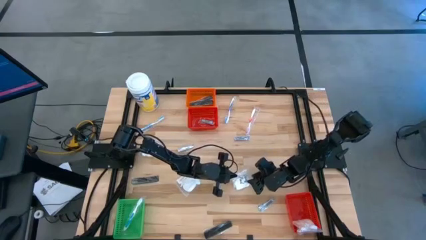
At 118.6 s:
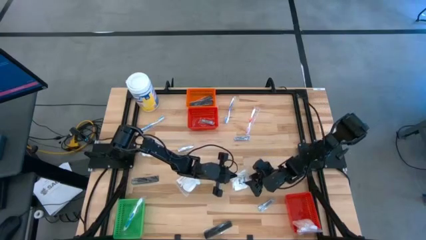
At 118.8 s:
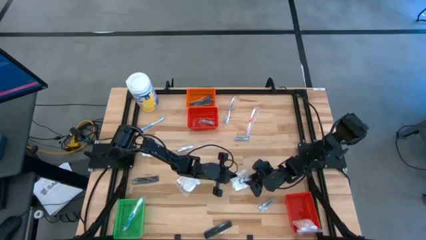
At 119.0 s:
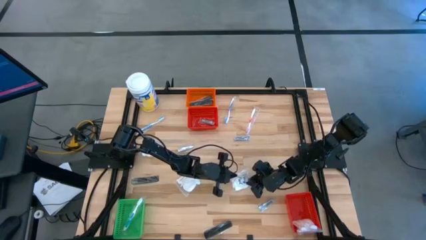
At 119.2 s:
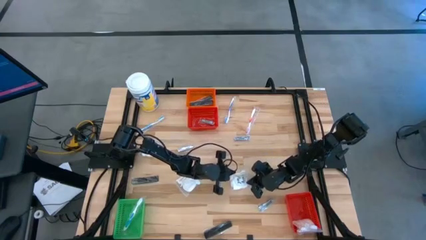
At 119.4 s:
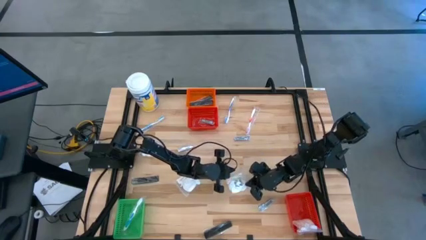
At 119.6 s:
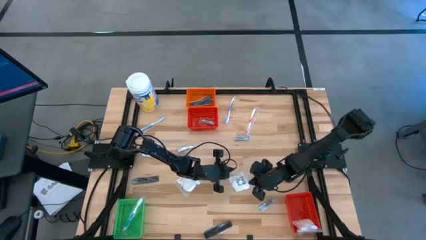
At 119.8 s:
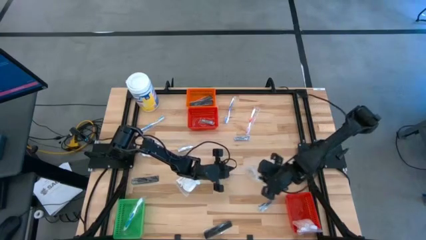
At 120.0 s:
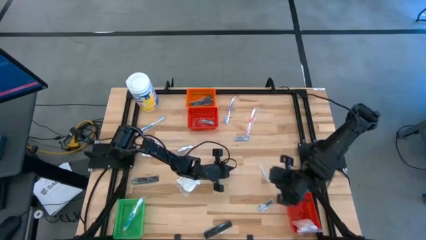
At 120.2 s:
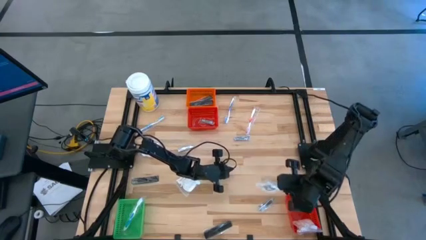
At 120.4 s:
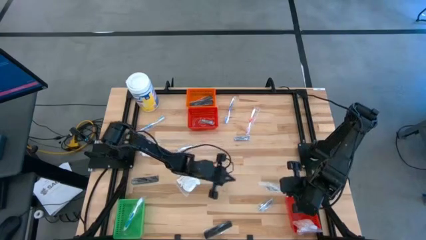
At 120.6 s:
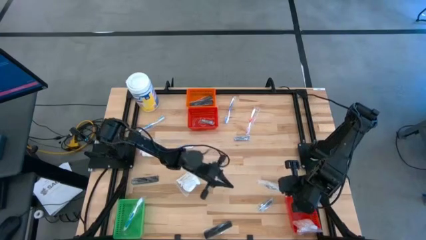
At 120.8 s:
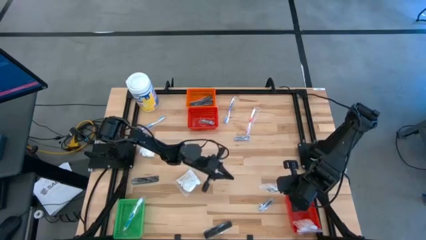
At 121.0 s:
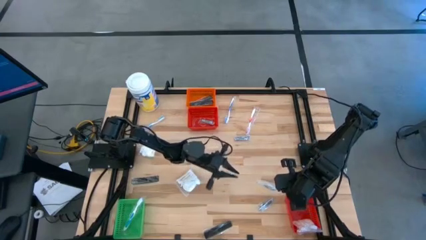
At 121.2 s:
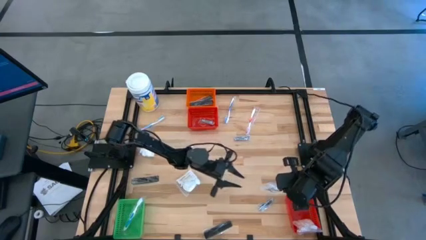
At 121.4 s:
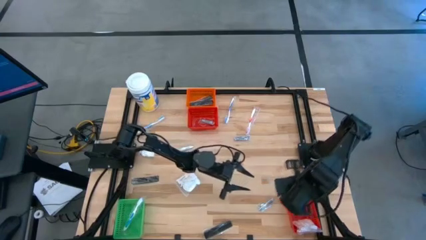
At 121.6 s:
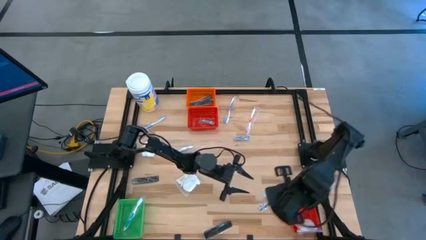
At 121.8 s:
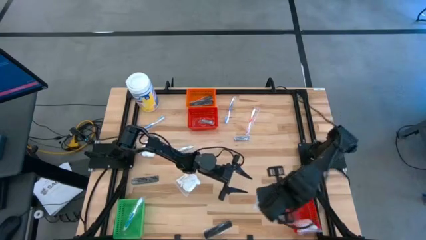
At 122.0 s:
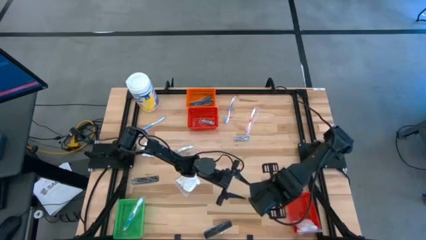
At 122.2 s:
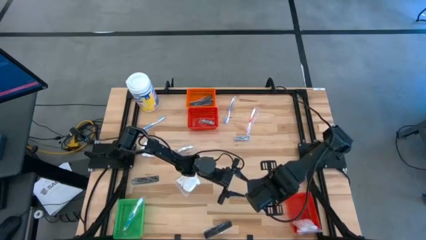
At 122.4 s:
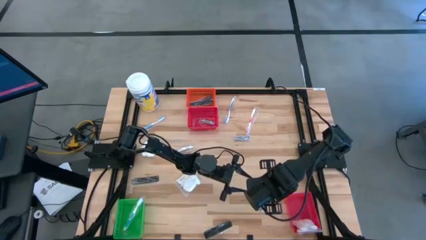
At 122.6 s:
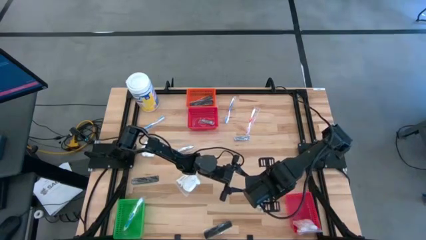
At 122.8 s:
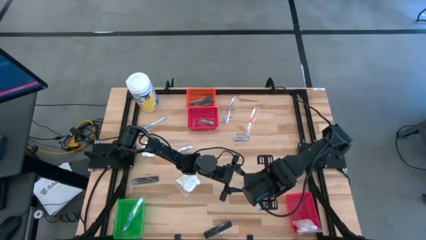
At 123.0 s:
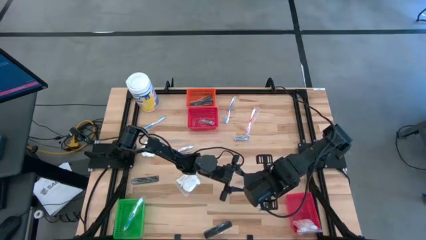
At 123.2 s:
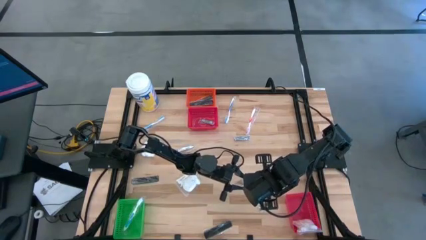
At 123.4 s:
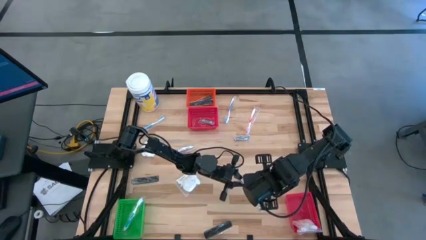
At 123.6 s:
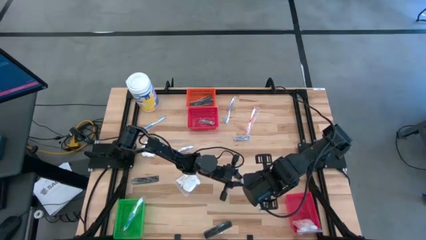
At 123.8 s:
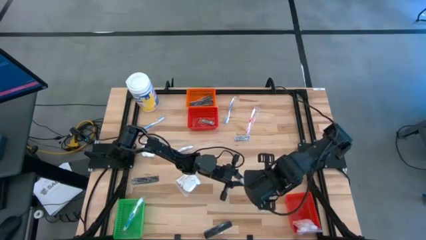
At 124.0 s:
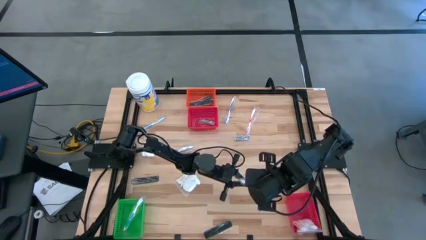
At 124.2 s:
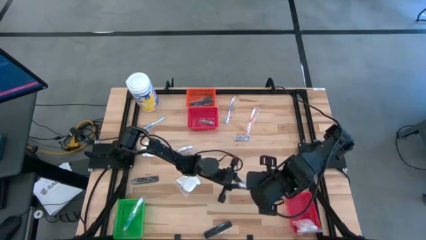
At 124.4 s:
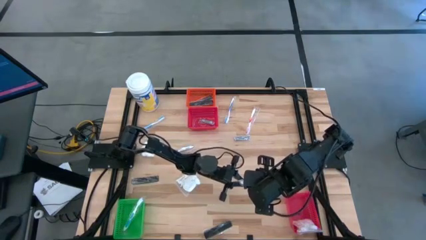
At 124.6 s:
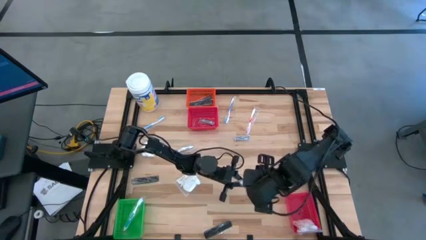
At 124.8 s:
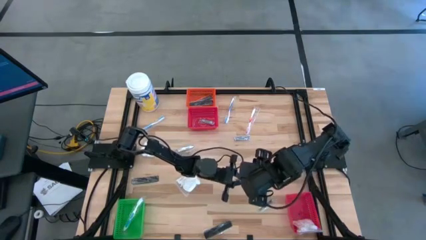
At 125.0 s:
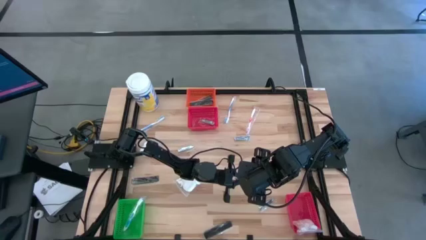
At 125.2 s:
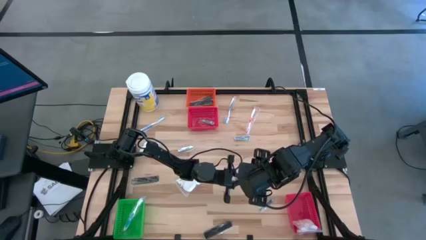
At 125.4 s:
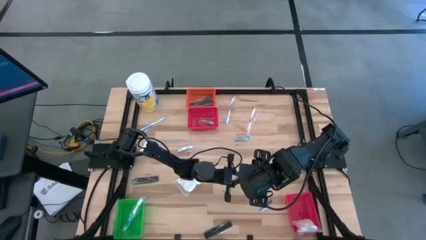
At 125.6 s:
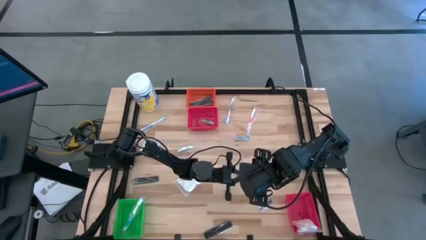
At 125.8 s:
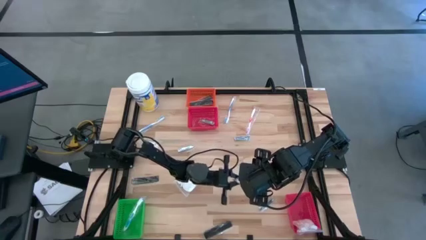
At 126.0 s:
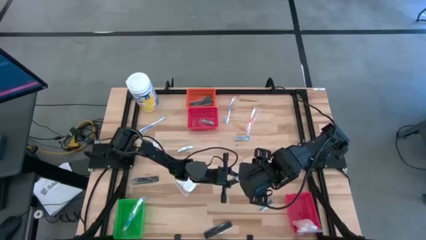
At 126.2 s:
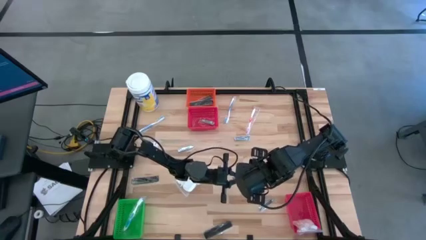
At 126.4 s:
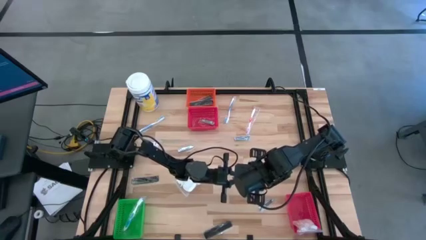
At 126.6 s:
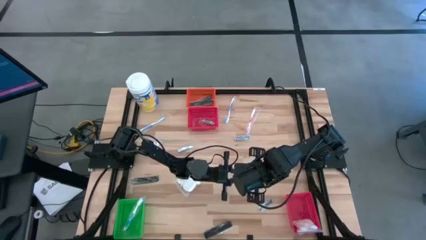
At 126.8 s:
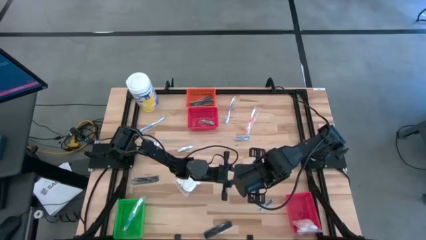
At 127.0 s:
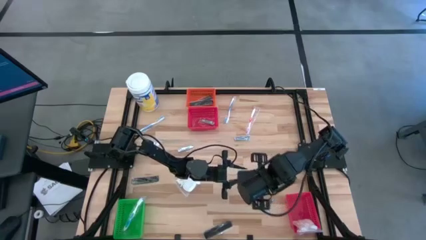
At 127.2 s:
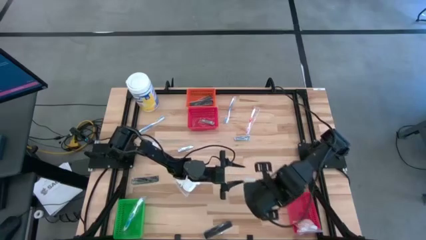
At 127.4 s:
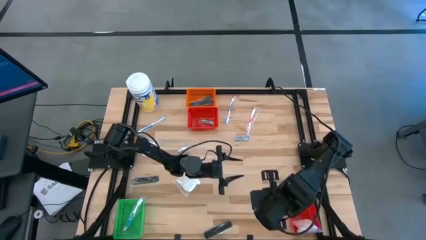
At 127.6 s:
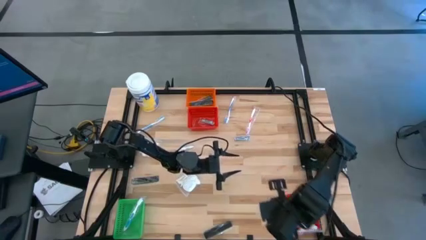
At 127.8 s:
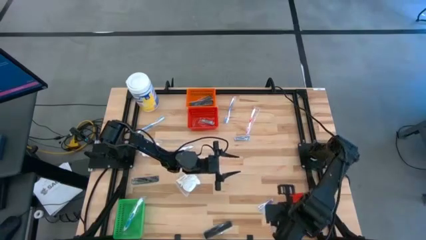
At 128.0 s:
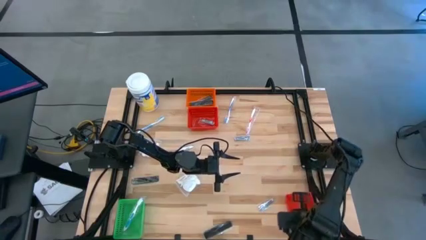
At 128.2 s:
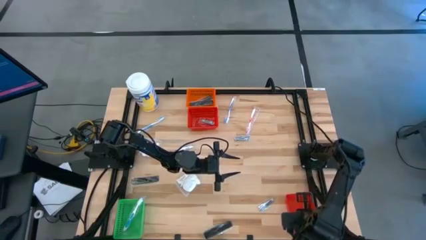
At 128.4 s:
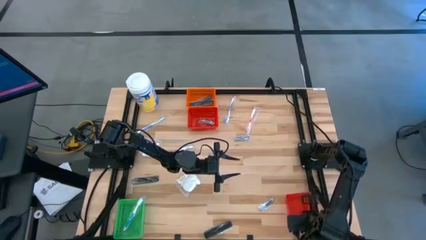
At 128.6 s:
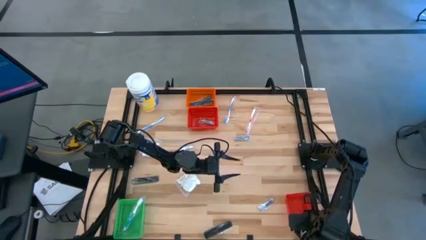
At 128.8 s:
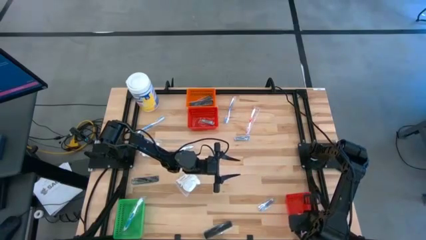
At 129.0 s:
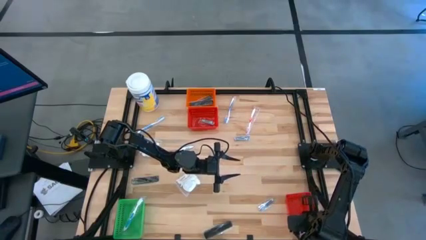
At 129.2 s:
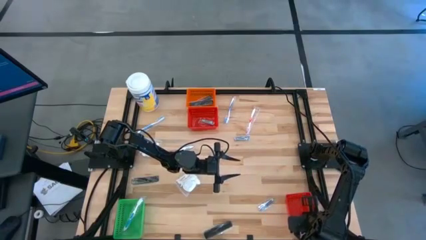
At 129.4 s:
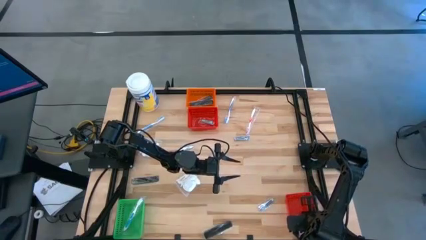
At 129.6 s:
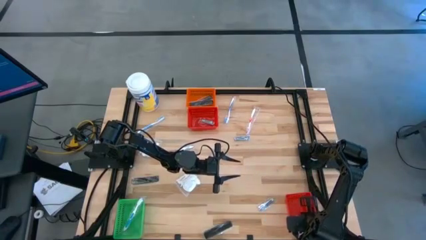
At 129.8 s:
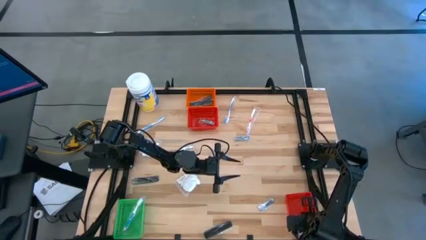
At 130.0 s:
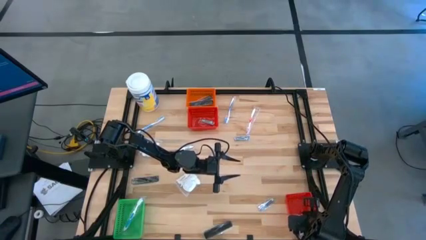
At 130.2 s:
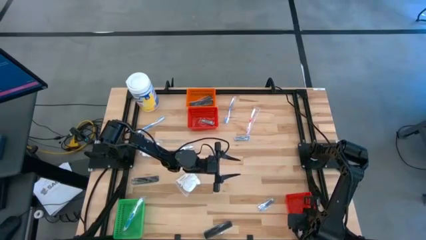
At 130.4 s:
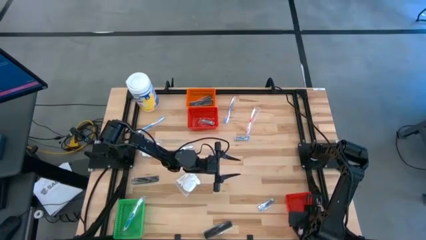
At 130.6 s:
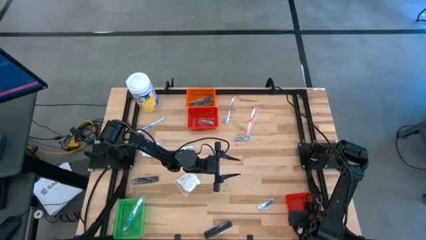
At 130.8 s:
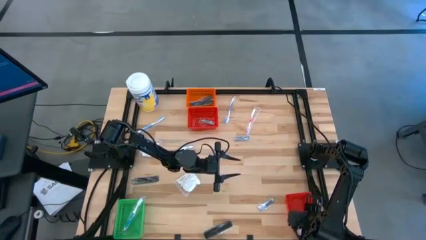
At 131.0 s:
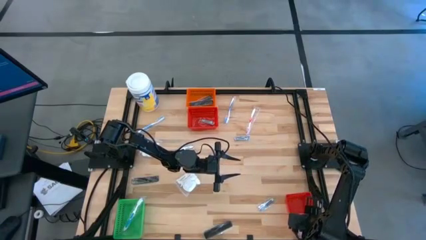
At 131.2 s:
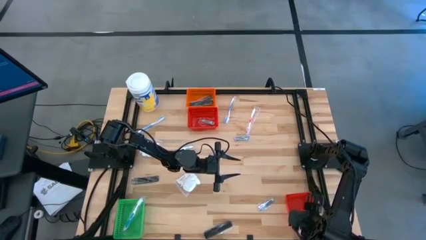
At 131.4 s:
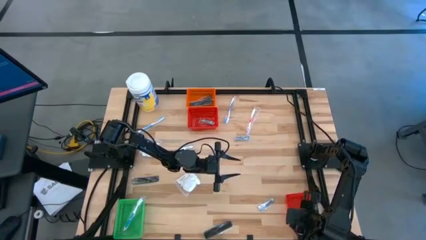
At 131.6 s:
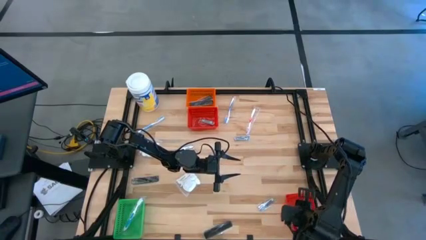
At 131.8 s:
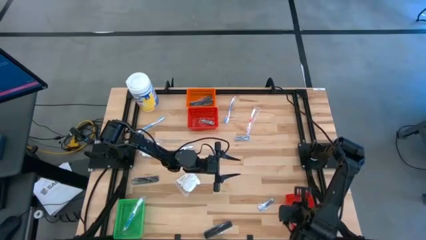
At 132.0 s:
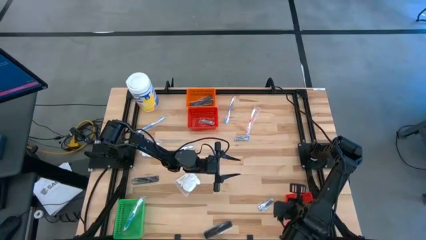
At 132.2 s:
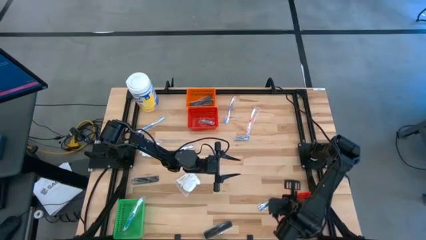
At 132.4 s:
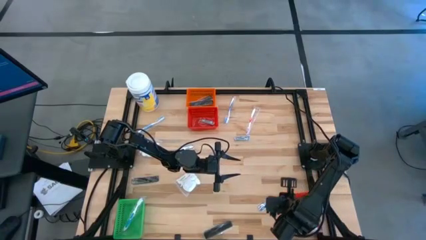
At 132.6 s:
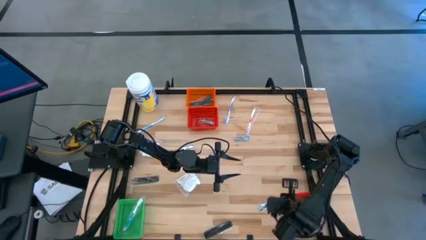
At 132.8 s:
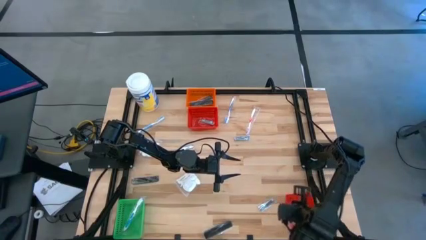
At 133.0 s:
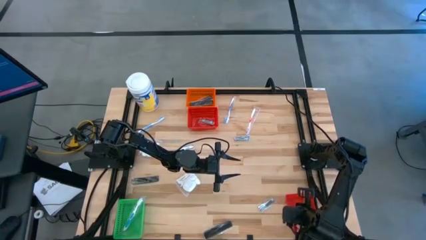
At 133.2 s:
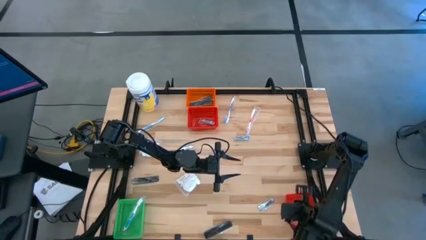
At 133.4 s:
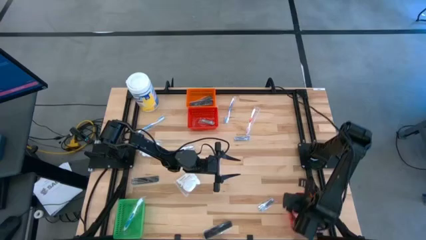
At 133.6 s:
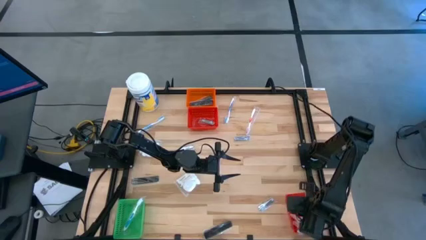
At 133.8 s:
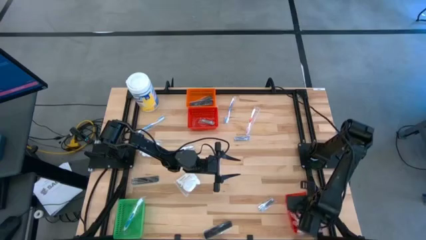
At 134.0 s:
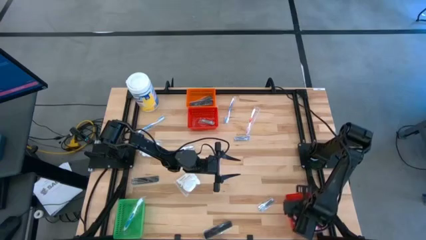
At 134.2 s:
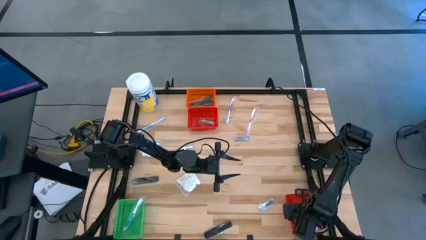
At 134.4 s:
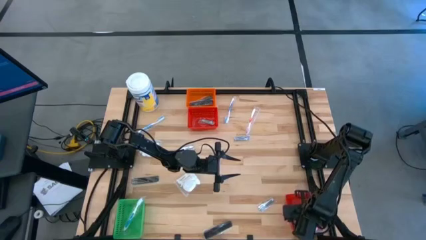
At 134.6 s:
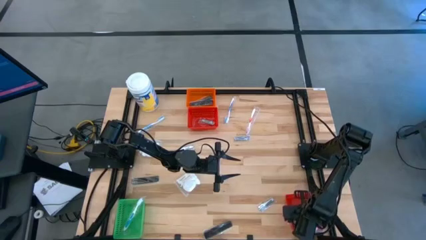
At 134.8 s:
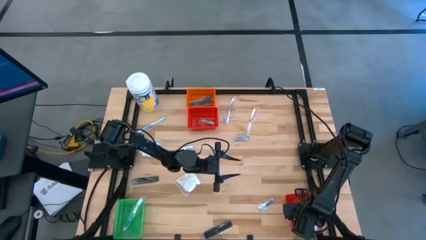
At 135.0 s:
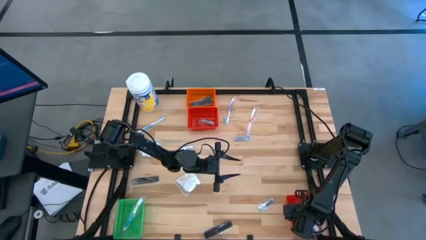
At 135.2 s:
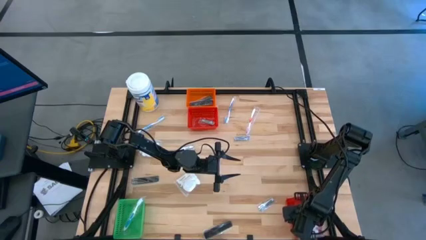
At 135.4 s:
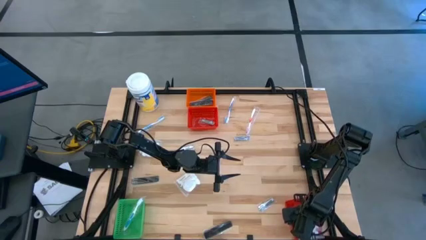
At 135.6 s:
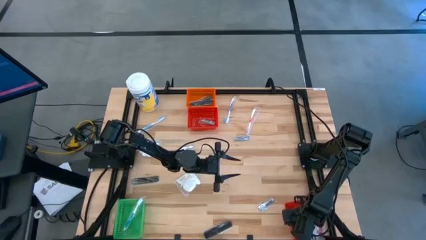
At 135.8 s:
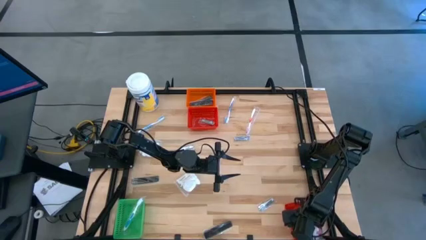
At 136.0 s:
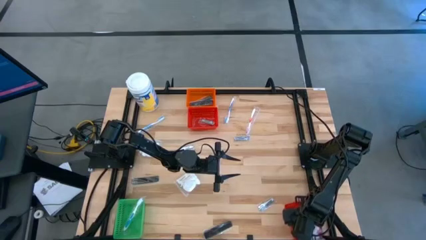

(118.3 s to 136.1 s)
Task: Pick & Place Travel size toiletries
Put the cotton pack into the bottom red basket
